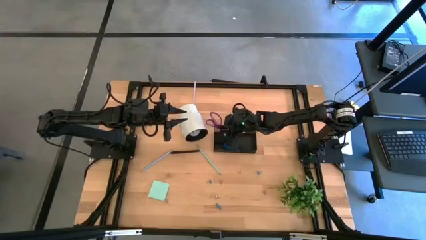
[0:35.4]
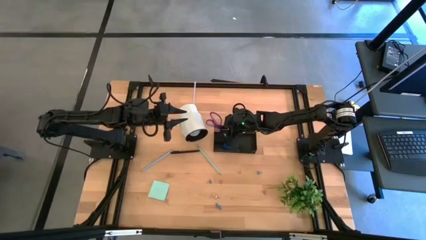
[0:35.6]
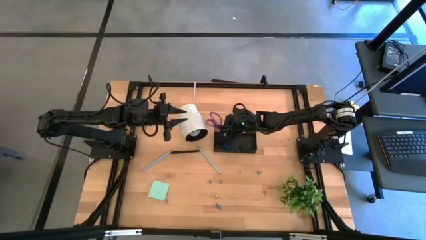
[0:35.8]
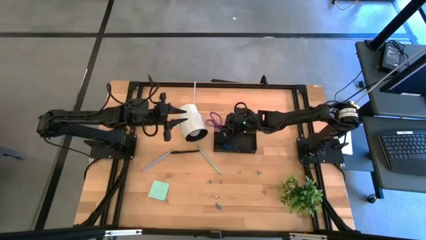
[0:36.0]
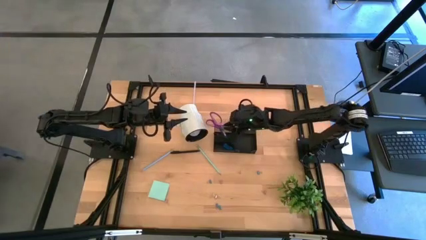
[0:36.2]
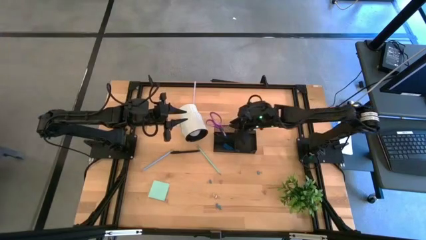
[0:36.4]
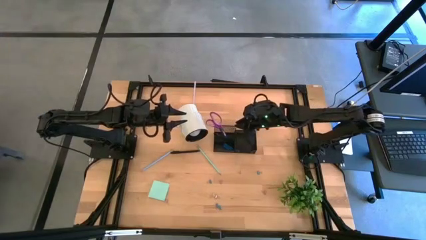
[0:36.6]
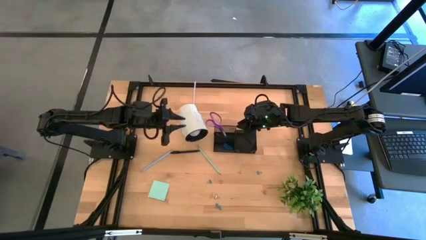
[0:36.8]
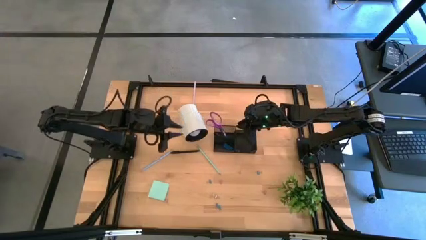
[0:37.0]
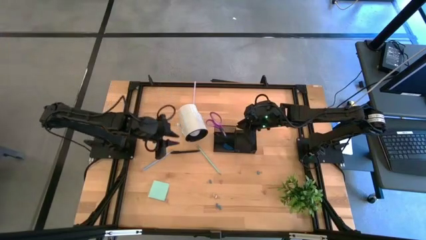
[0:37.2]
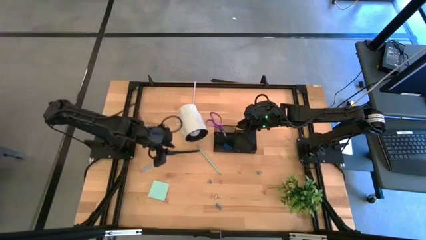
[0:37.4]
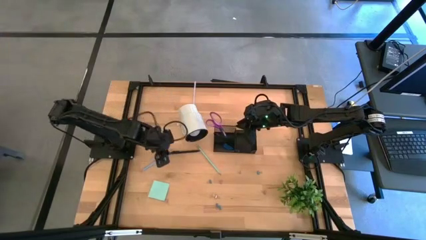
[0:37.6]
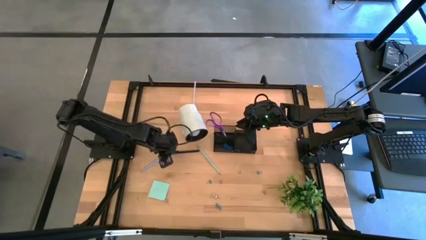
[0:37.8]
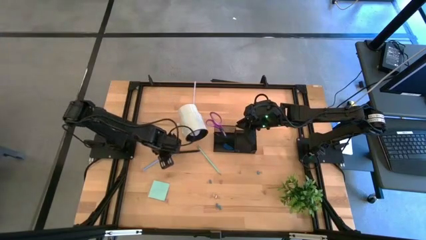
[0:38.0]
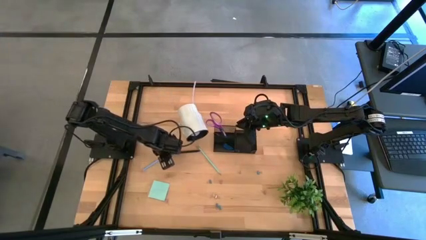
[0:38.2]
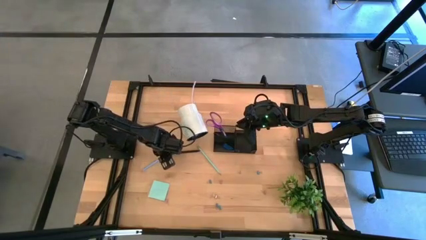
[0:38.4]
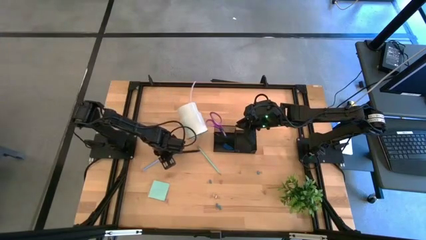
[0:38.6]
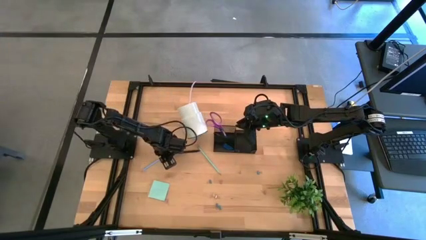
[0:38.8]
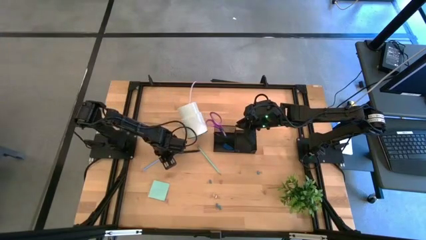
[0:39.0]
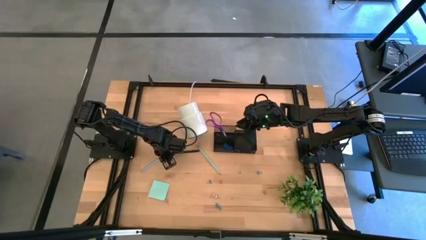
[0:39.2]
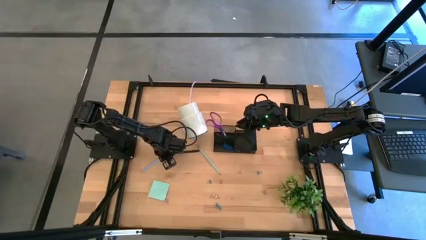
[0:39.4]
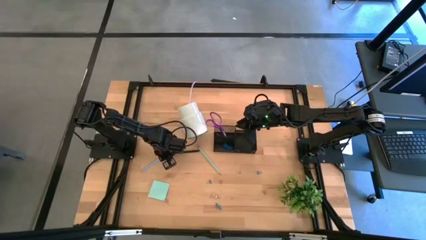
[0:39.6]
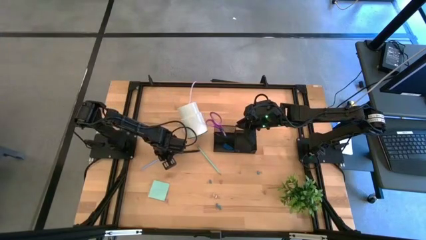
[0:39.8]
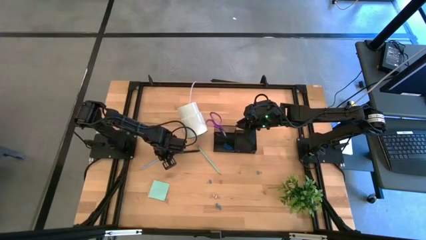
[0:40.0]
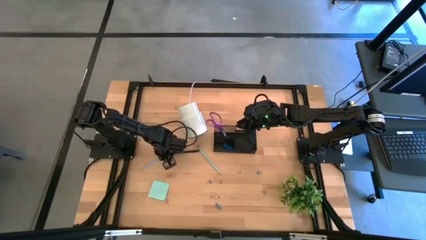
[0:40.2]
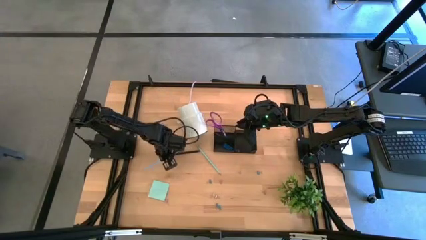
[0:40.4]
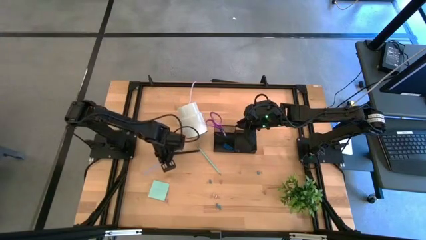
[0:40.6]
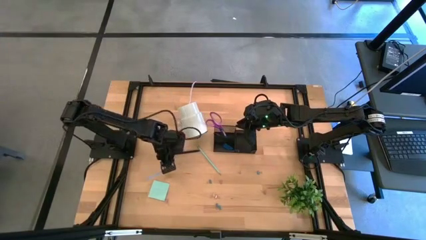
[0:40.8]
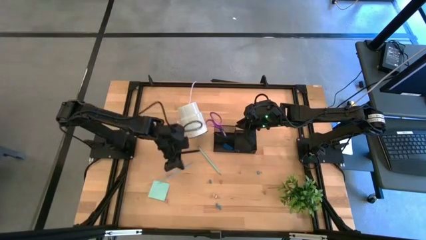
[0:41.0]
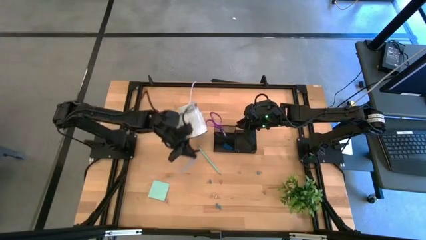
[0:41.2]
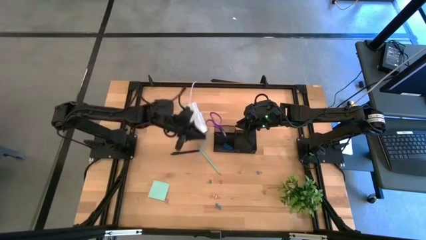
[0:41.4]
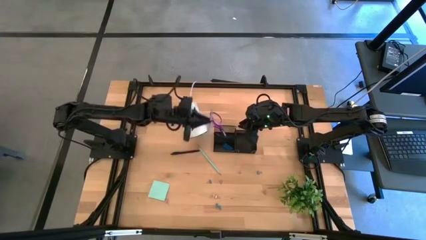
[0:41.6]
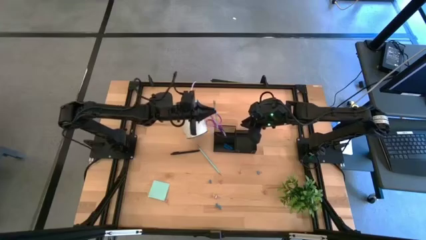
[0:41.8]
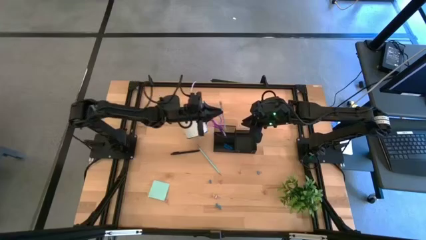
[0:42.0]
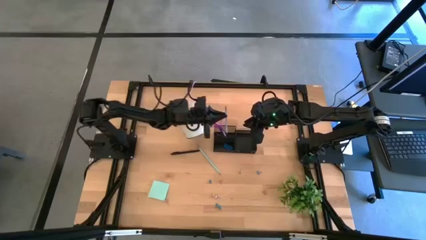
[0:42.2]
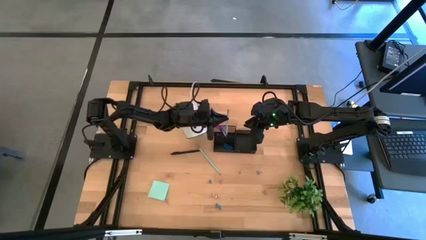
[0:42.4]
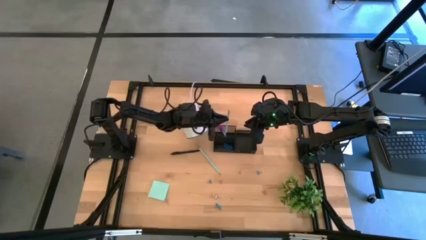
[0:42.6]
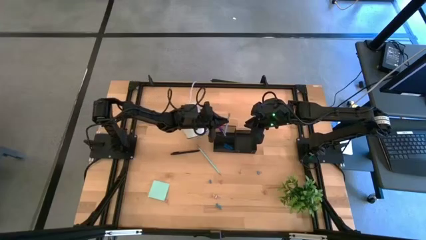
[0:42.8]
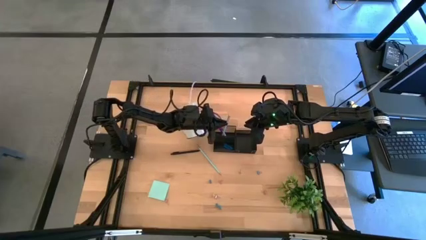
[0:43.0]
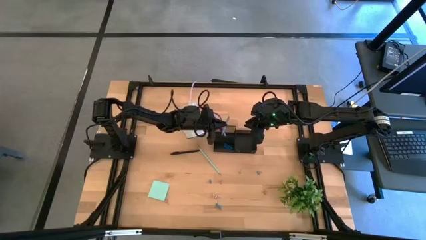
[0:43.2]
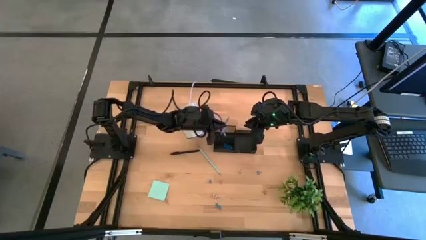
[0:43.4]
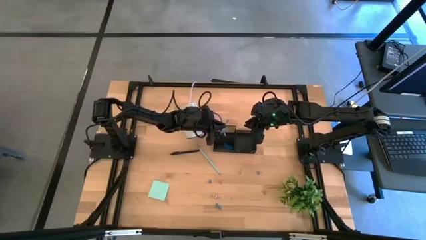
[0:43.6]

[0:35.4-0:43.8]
Task: Pick and place office supplies into organizer
Put the blue pencil into the black desk organizer

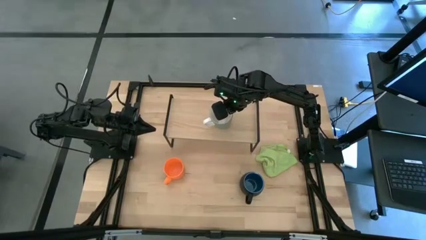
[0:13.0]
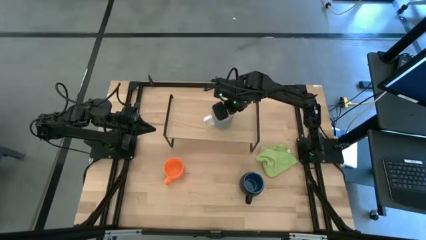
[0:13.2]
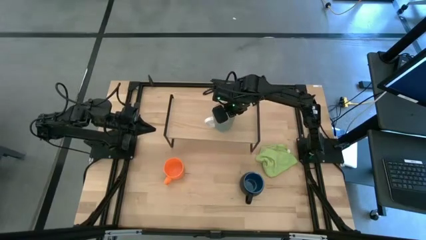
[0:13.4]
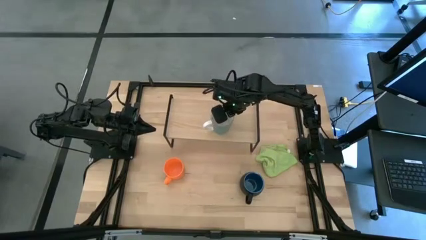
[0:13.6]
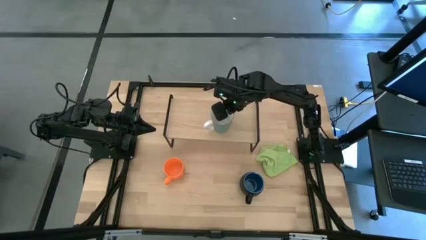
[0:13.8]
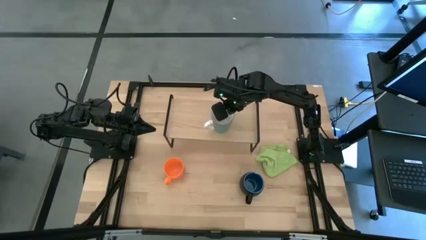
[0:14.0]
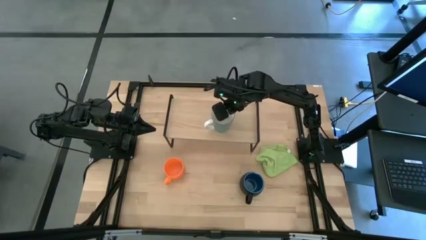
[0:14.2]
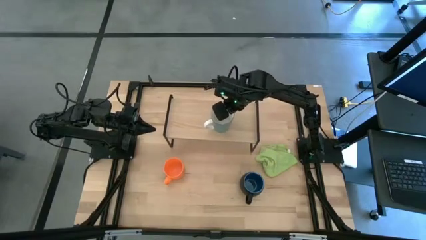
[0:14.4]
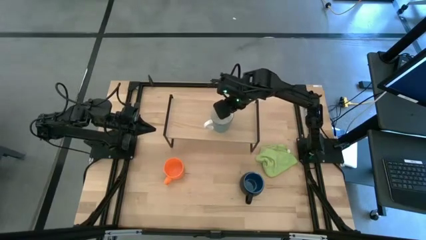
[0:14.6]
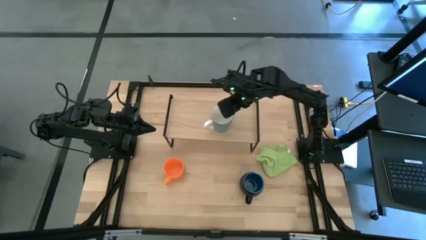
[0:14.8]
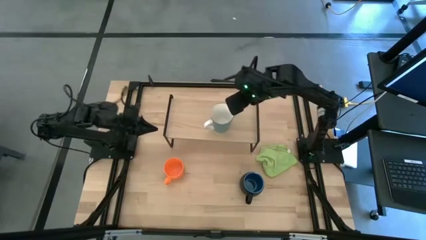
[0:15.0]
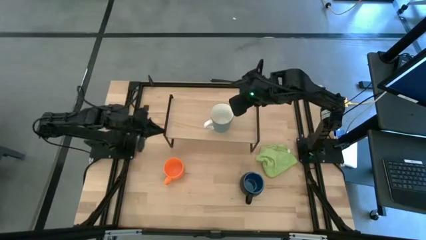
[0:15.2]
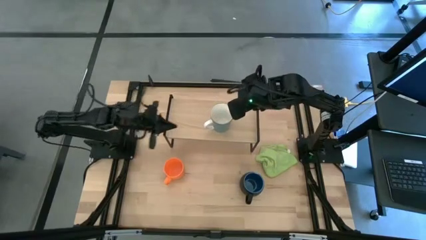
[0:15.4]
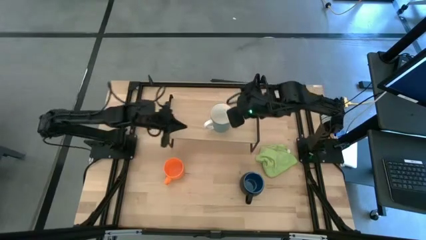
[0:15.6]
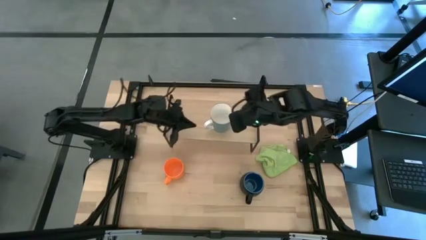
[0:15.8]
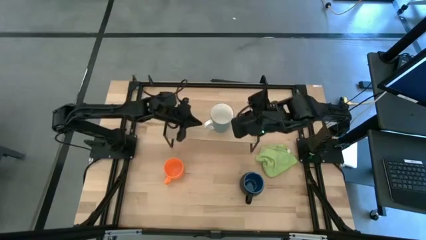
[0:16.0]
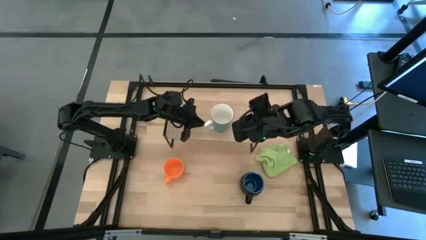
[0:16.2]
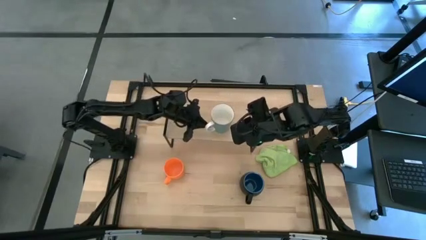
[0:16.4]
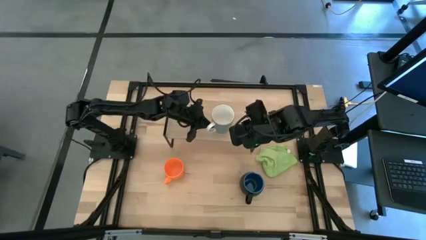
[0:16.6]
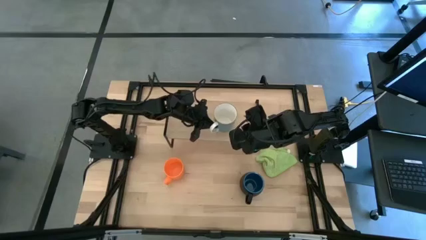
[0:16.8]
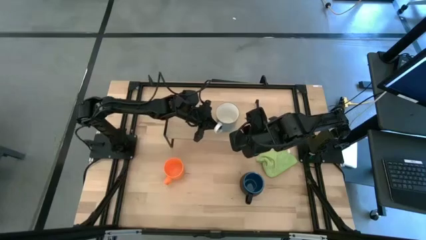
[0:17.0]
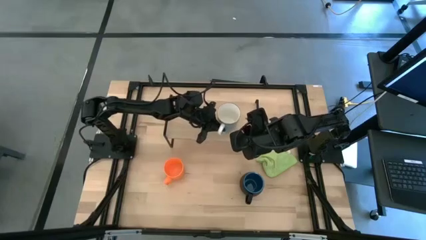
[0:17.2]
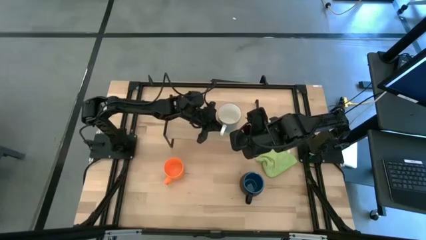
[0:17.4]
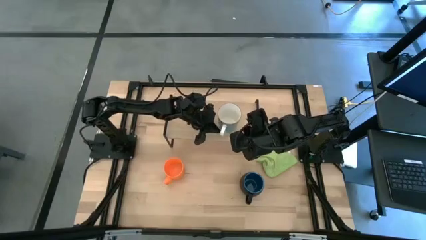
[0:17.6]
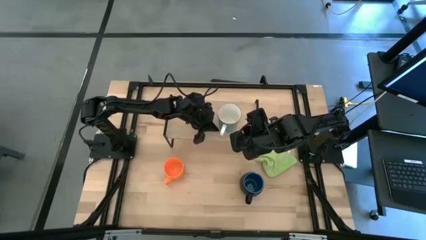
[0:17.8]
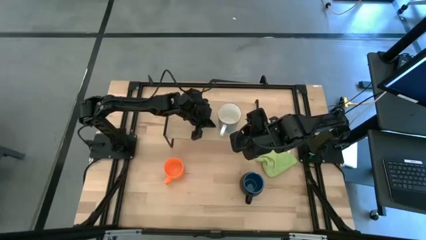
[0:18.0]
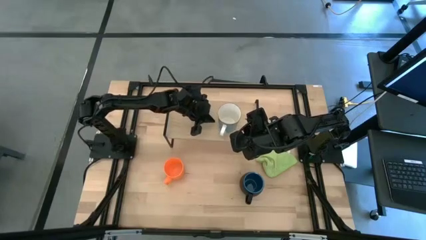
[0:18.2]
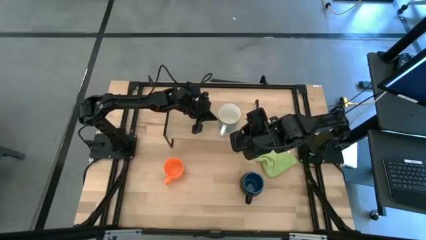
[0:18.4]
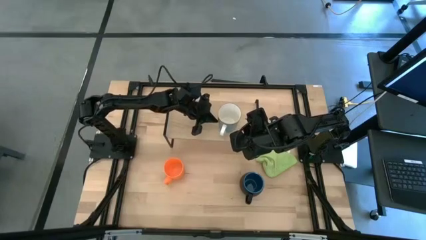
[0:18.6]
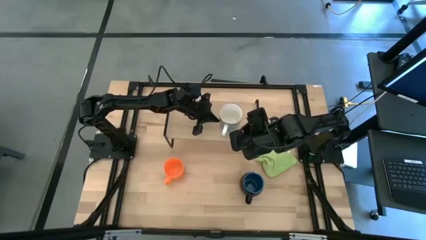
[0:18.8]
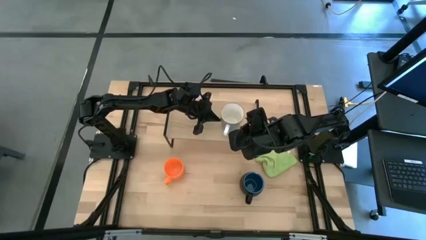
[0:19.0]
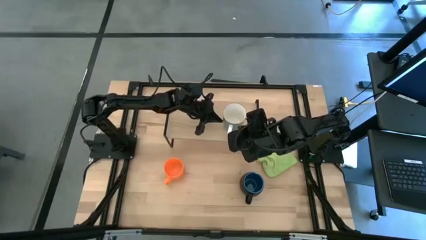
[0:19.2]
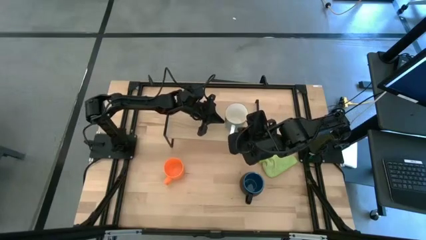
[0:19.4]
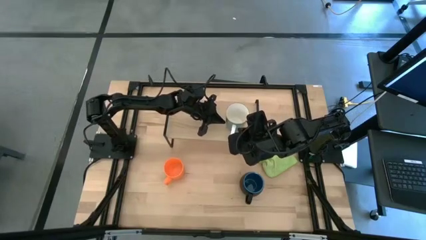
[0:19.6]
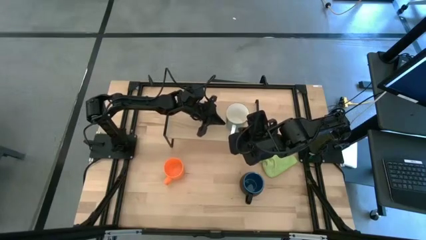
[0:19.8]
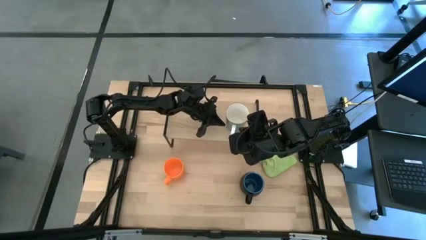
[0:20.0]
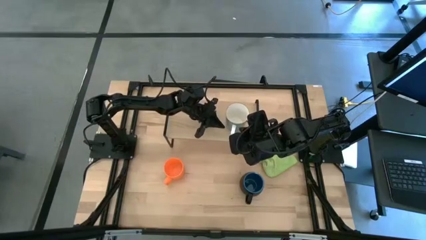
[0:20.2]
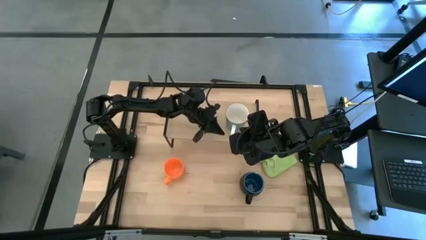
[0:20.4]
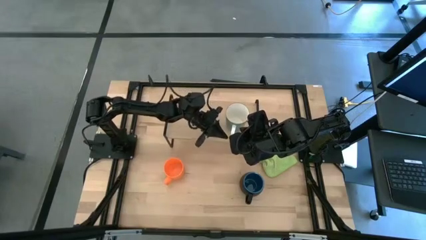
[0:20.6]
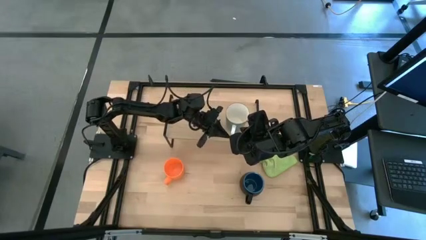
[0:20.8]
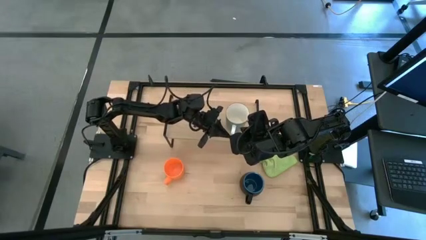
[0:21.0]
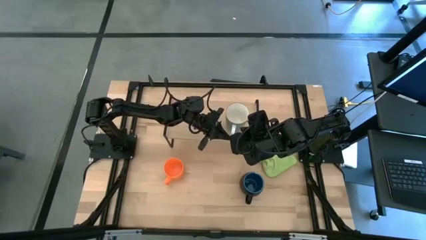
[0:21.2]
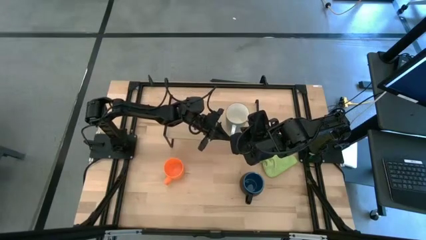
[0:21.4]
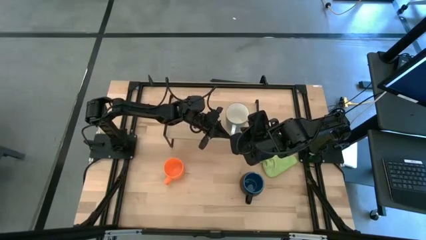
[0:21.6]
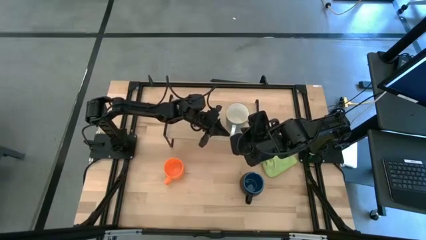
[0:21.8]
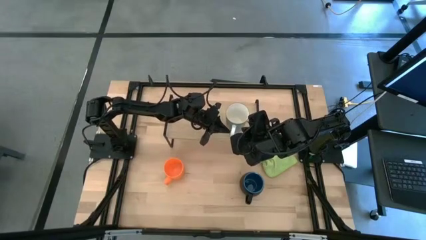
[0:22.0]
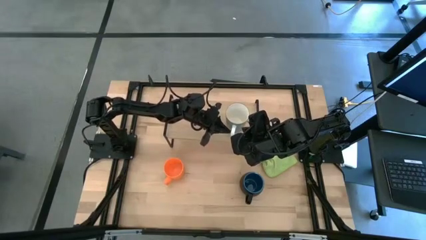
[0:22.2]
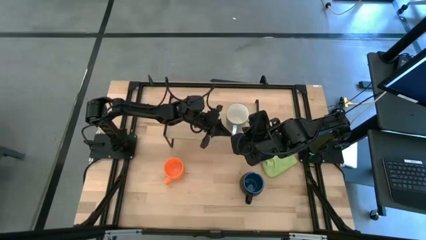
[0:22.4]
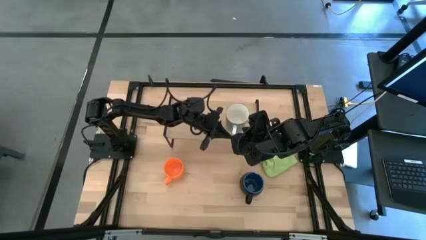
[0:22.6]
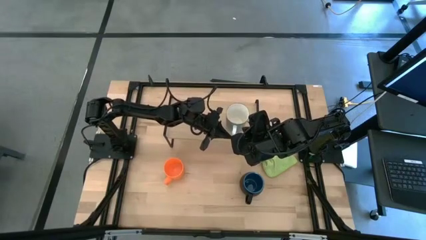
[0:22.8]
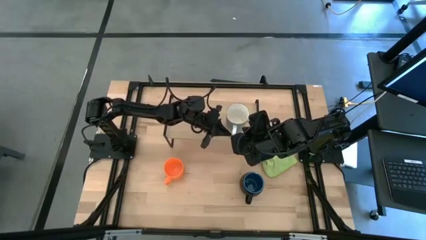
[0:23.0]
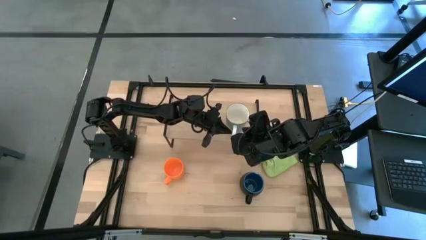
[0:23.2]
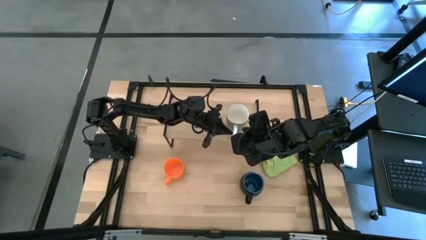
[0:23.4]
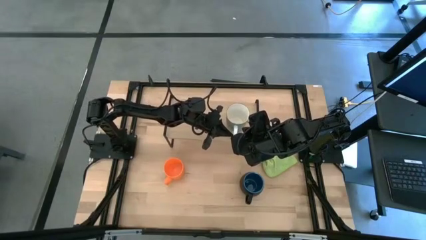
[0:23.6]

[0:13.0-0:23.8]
Task: Stack small to large cups/mugs on shelf
Put the blue and white mug on the shelf
